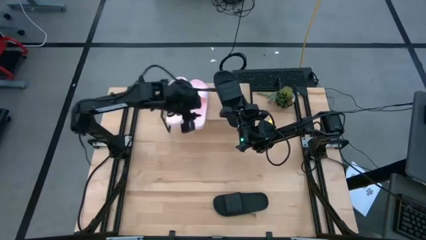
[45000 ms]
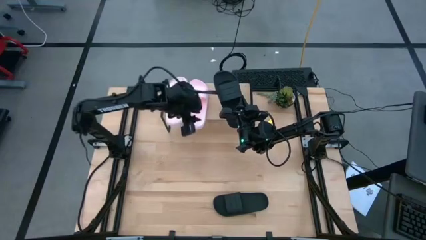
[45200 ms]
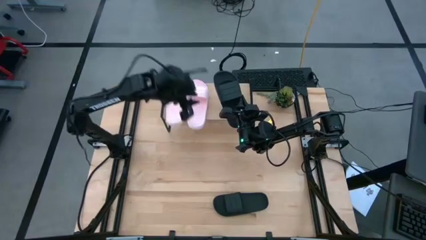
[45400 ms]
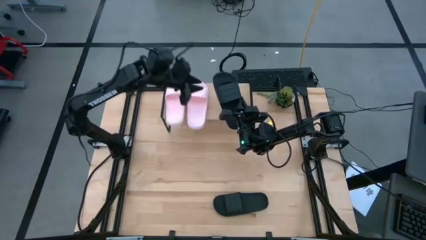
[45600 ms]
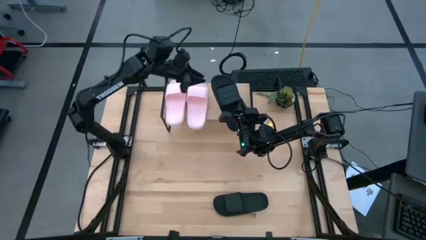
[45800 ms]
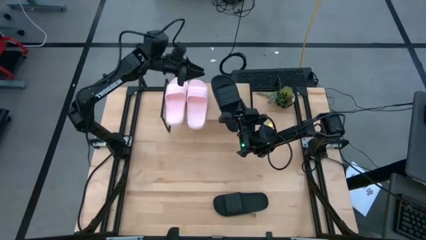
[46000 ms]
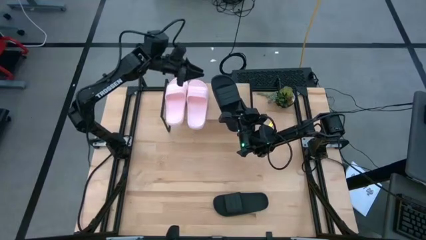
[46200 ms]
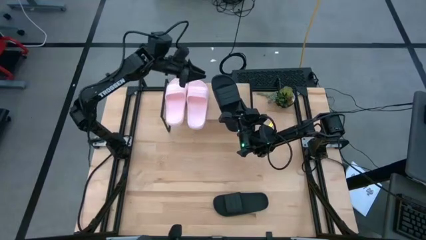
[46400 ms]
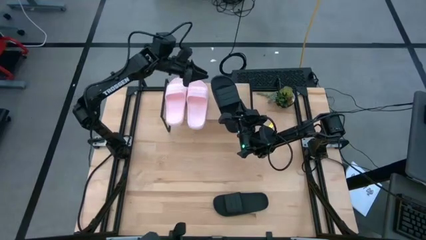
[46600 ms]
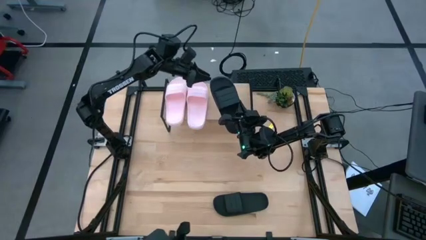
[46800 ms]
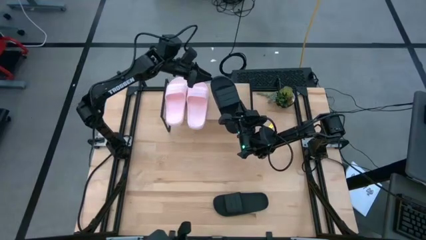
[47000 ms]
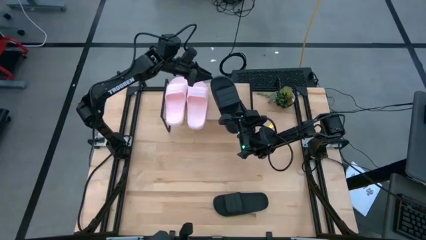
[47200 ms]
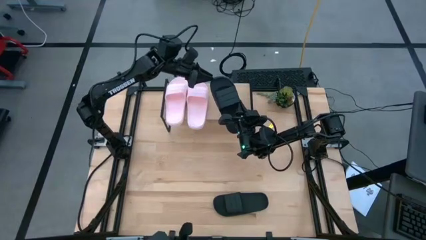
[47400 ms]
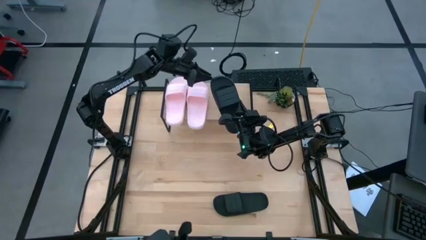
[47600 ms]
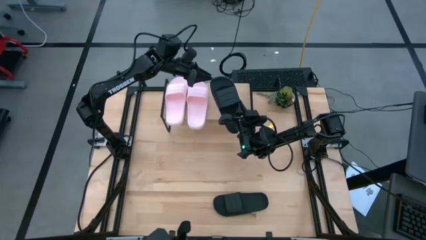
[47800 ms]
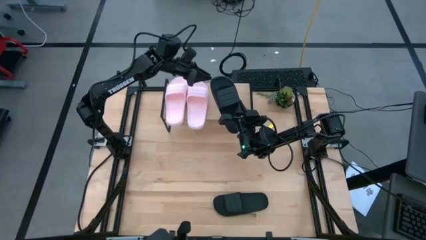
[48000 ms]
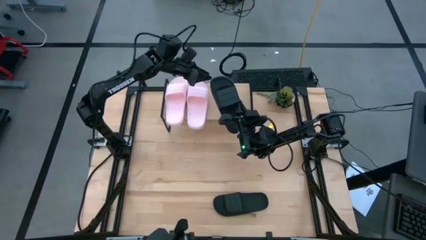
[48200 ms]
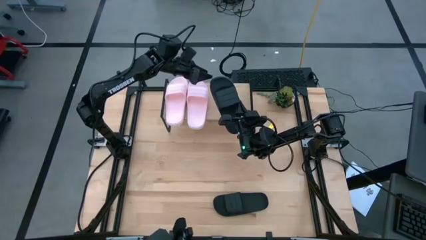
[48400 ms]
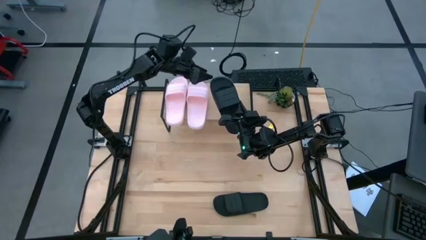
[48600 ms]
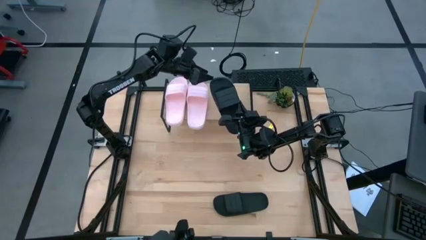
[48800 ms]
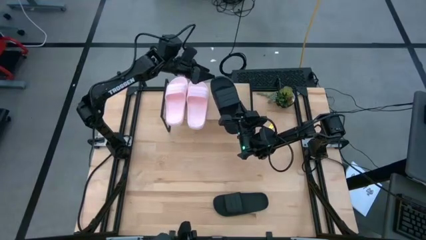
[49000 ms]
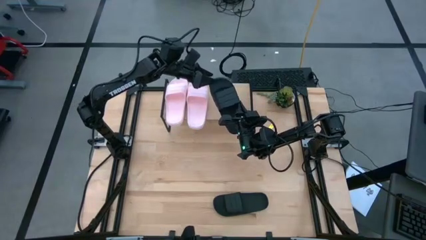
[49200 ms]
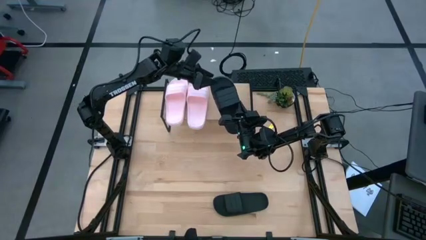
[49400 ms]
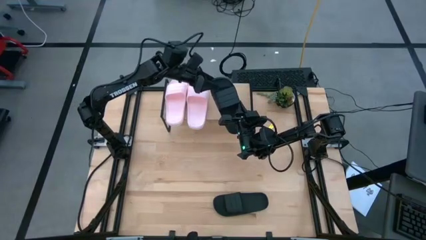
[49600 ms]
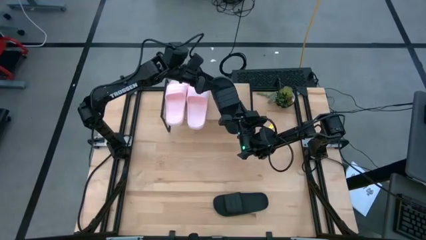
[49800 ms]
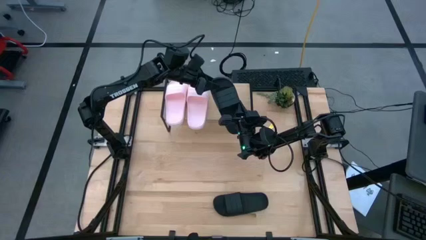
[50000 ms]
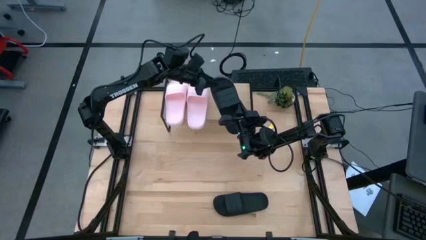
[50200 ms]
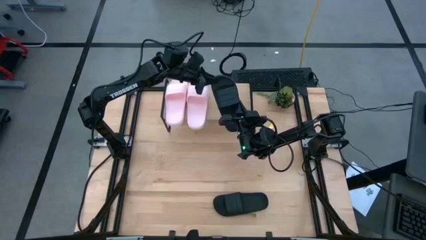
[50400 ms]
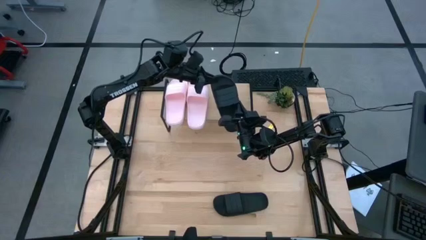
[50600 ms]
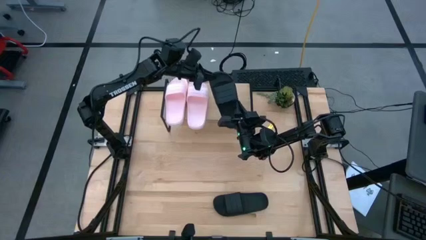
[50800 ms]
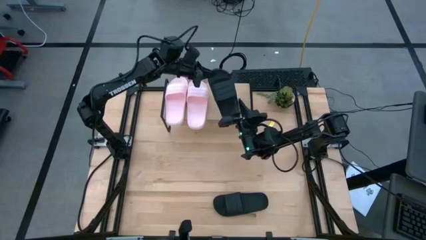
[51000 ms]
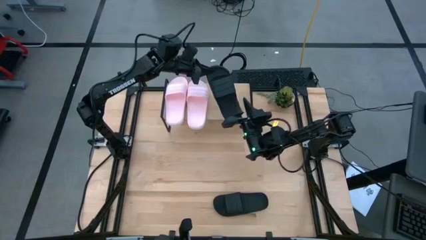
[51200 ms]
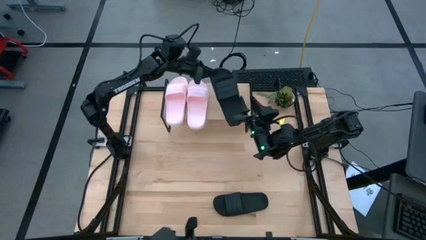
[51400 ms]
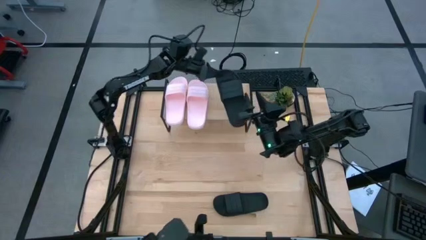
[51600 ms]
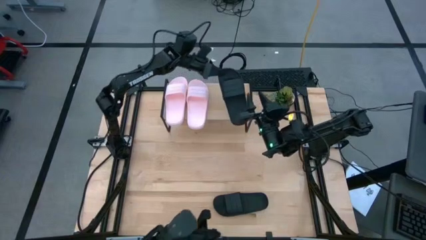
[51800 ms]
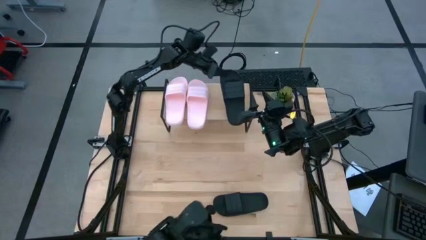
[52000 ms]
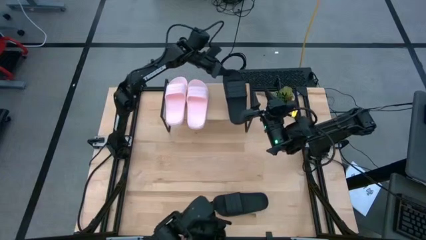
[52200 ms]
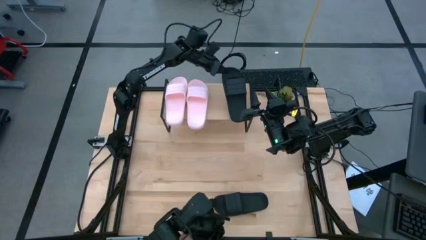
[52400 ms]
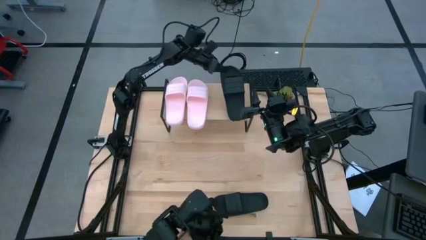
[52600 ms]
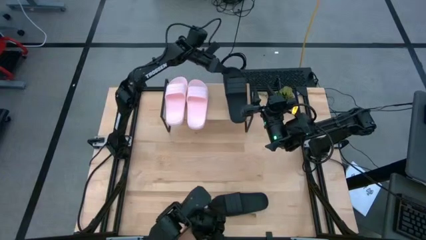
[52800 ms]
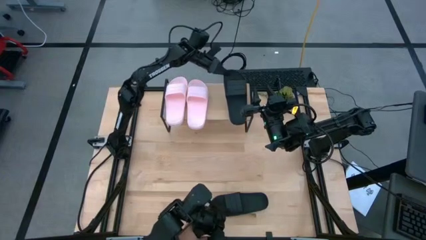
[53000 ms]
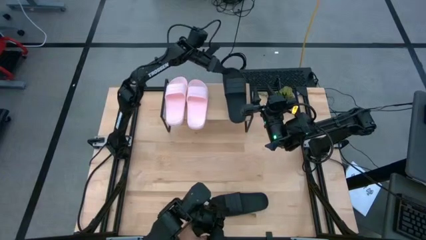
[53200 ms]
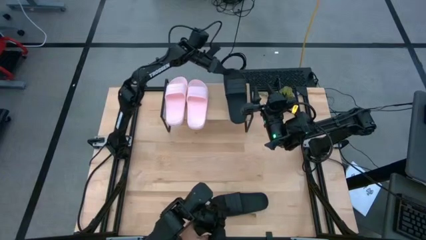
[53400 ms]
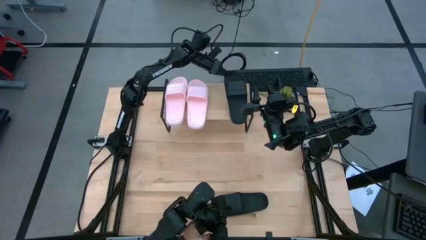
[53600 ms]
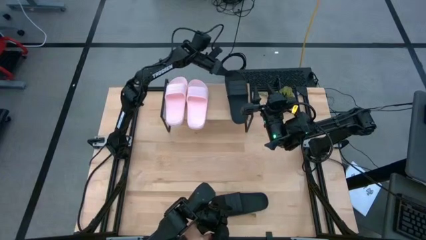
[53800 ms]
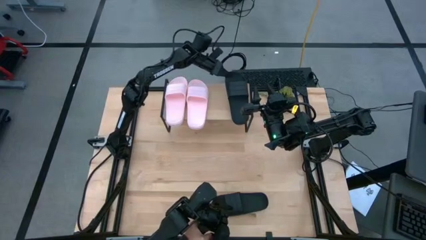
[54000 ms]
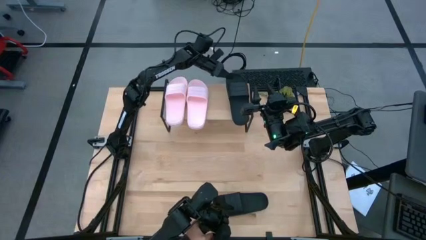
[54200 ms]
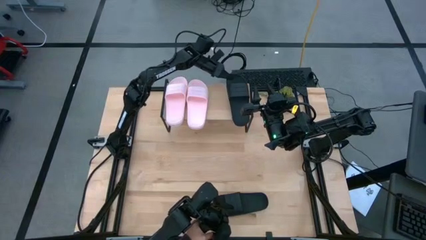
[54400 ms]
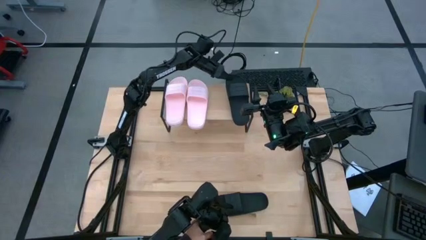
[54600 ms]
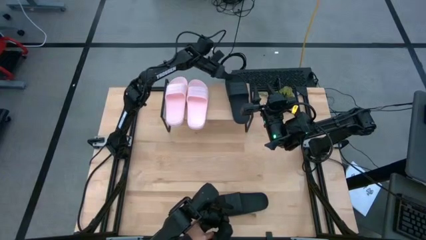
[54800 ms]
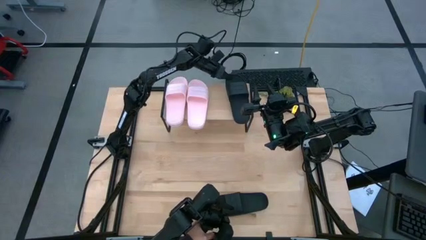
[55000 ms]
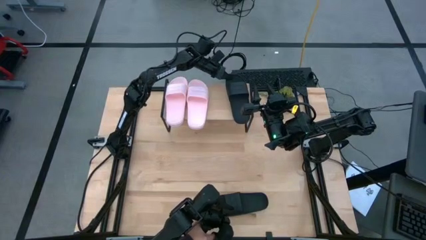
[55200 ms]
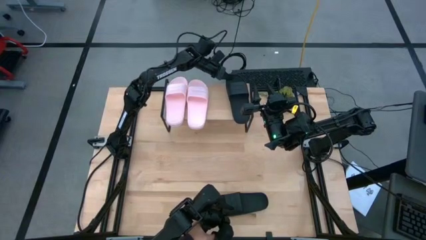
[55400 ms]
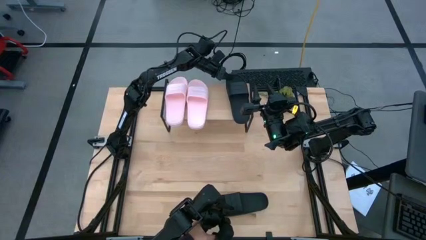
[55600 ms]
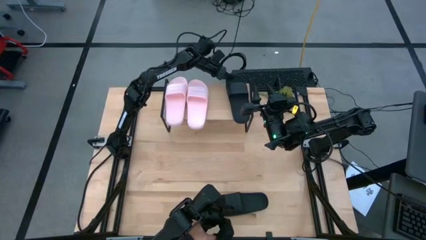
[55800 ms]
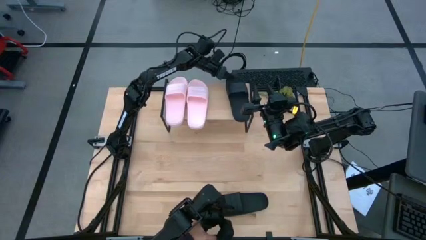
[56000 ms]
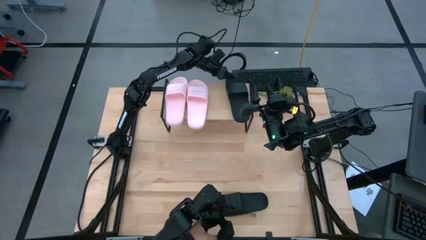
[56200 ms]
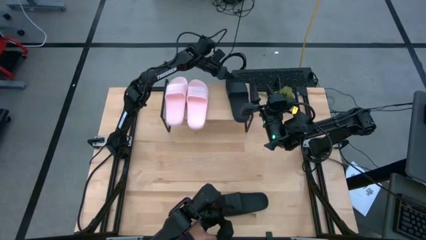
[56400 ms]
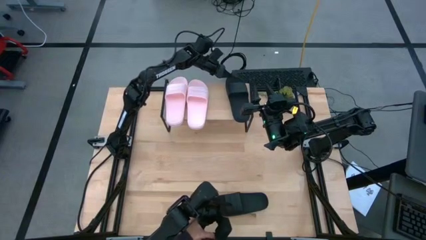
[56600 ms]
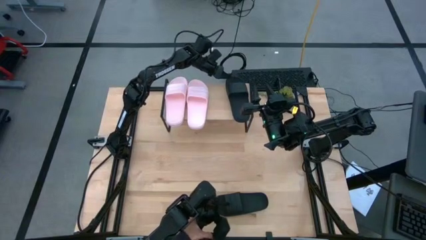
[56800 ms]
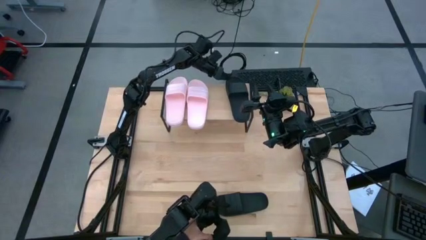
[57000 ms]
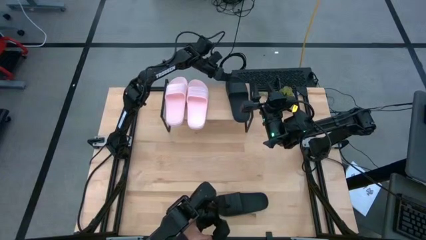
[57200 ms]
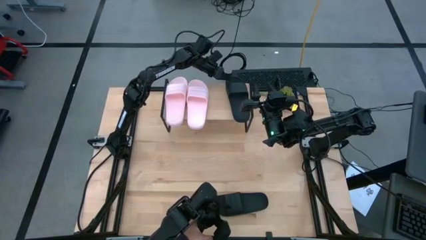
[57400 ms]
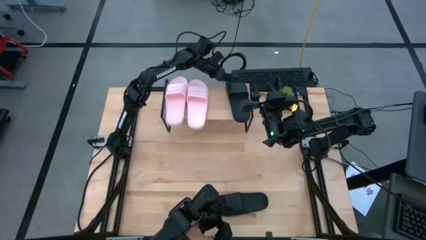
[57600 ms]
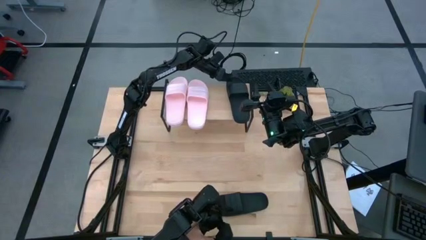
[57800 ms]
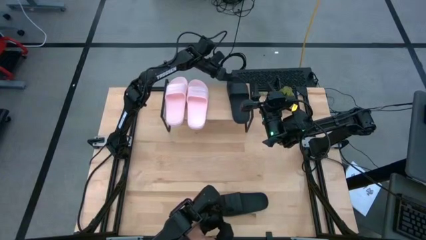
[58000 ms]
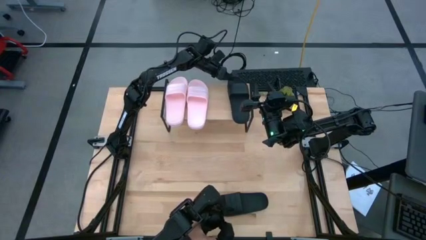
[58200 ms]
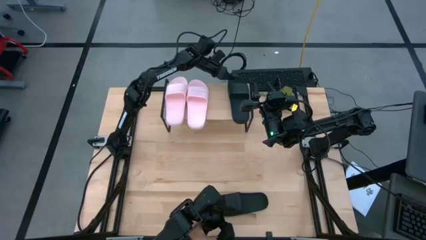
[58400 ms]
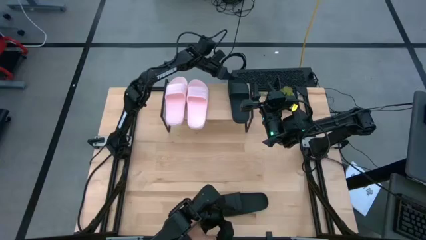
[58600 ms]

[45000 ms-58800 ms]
Task: Pick and place slides into the shelf
Put the top black slipper on the shelf
